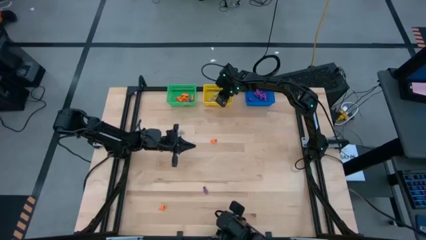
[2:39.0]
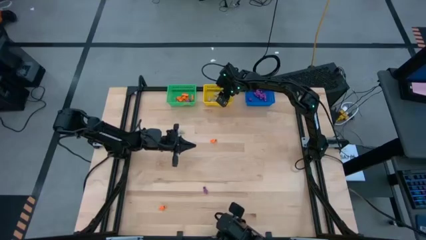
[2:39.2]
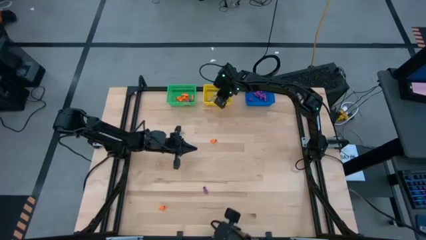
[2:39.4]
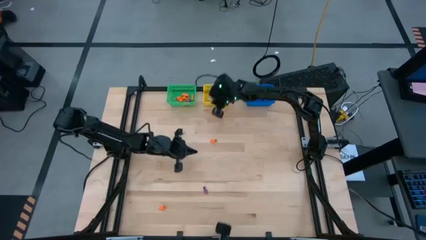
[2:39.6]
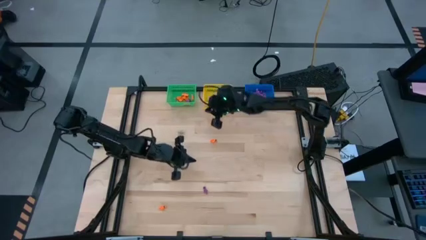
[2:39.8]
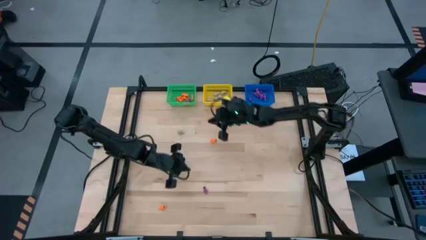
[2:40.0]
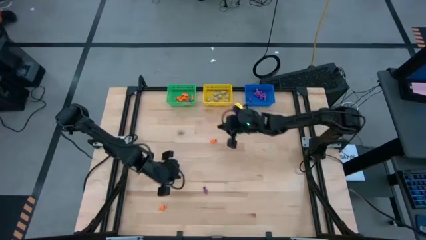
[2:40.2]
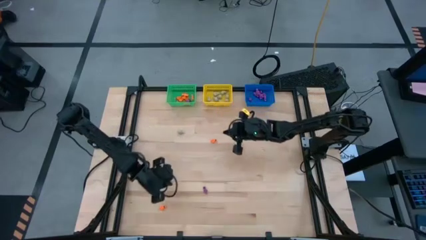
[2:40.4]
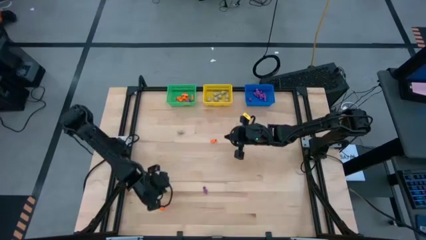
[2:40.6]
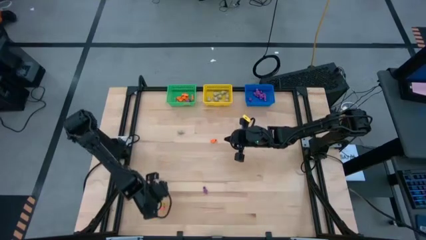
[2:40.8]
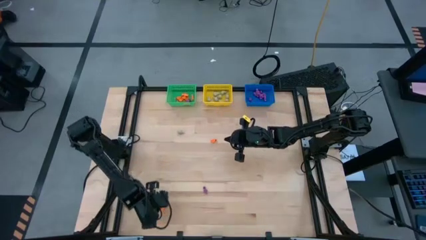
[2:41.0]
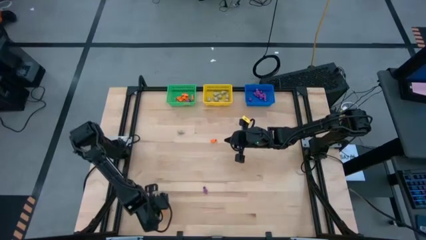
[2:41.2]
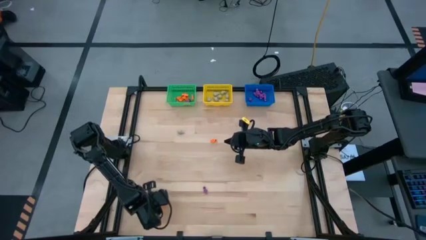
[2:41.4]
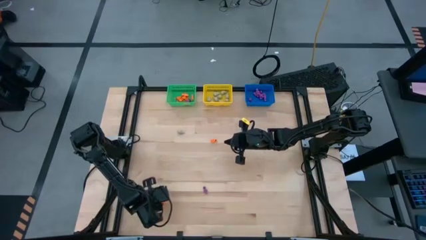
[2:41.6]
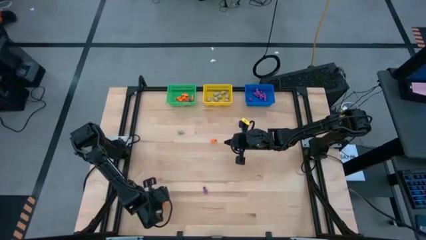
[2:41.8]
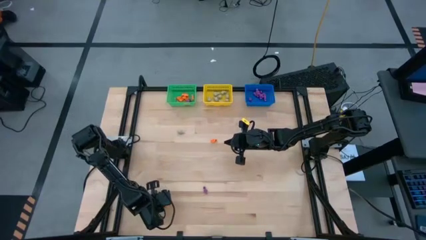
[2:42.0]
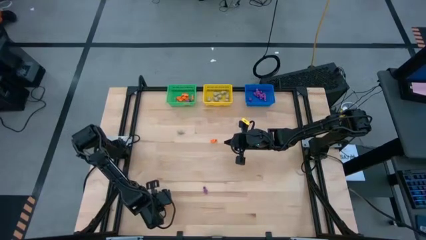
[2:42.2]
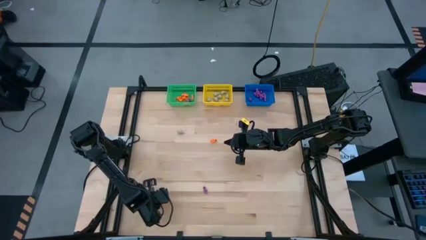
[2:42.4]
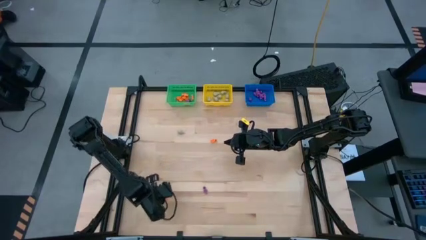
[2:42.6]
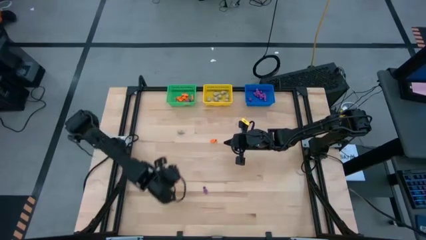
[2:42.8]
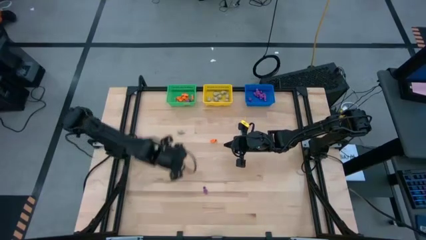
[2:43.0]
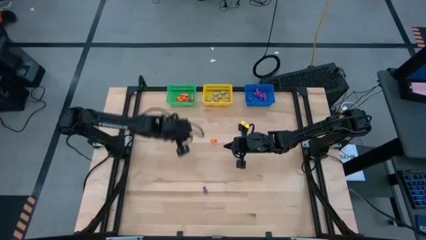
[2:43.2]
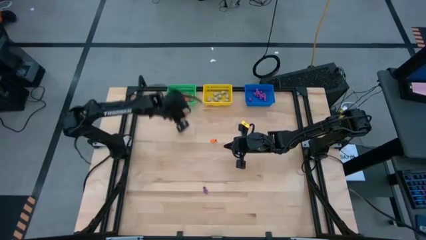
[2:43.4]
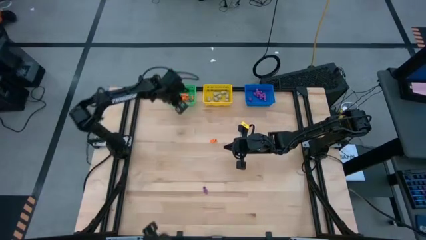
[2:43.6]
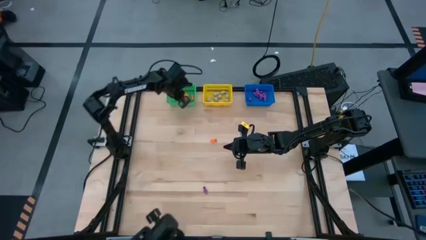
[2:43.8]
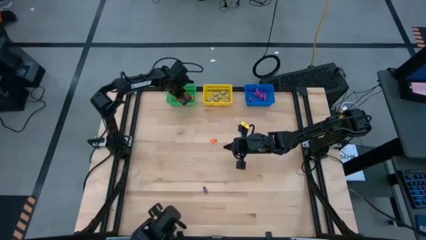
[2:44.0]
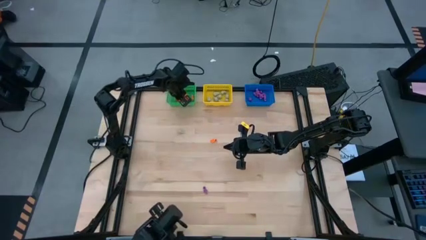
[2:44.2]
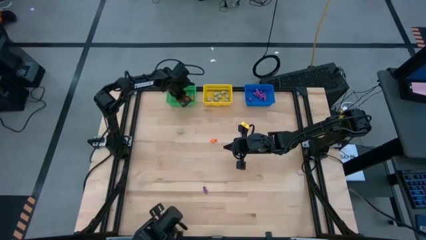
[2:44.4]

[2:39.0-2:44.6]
Task: Sort Halloween decoration
Put the orange skeleton toy into the green bin

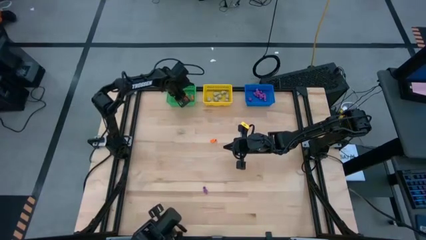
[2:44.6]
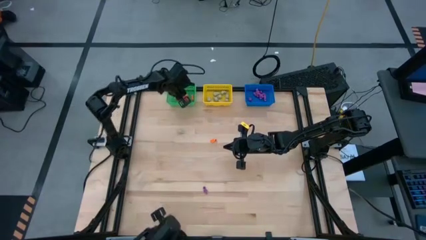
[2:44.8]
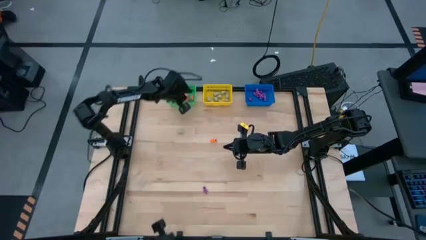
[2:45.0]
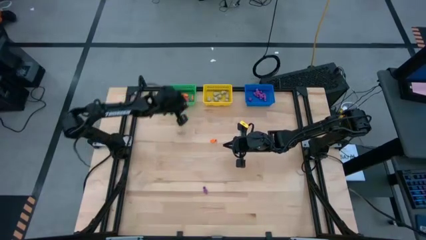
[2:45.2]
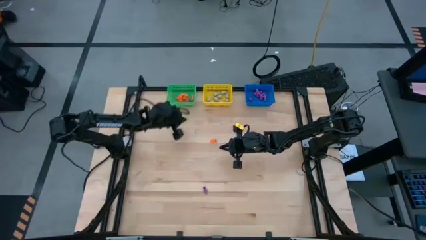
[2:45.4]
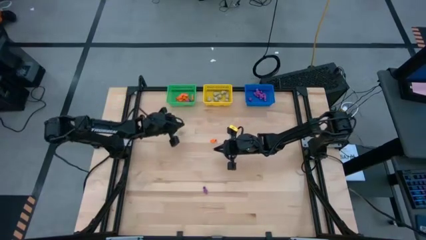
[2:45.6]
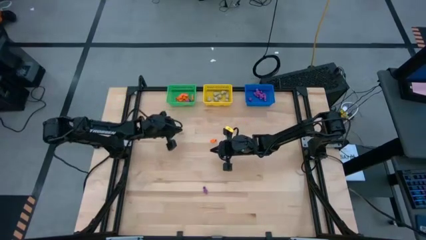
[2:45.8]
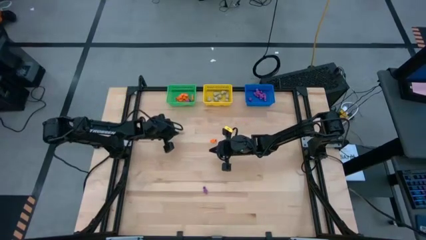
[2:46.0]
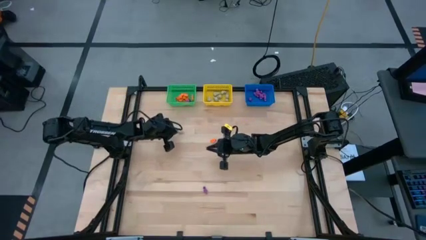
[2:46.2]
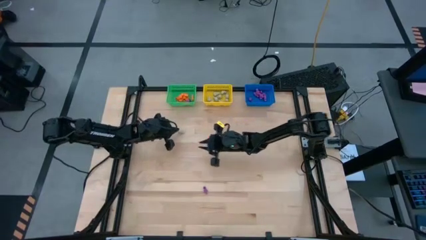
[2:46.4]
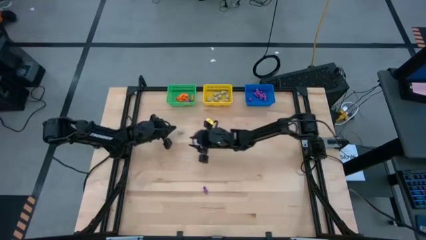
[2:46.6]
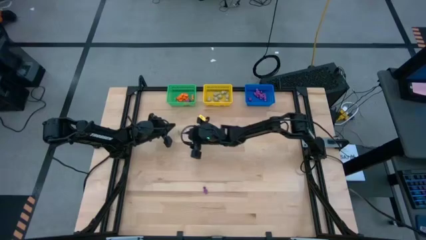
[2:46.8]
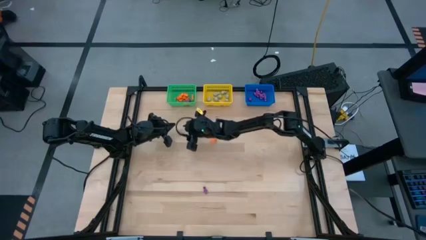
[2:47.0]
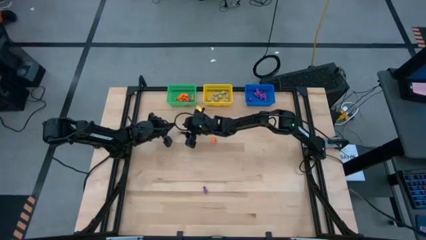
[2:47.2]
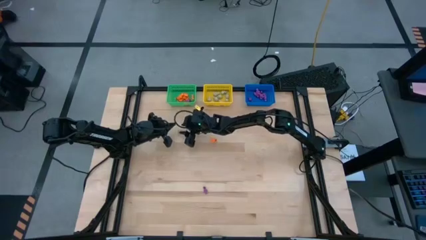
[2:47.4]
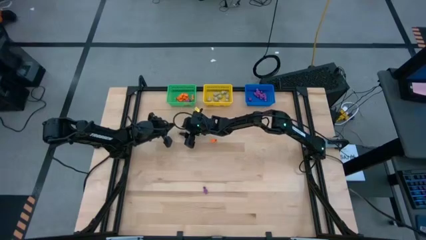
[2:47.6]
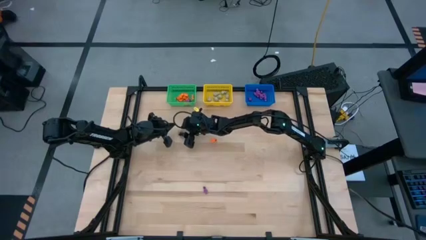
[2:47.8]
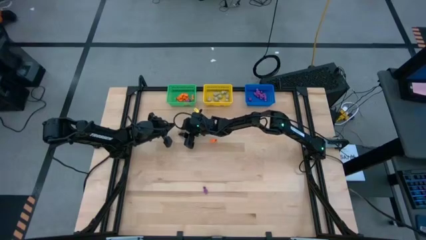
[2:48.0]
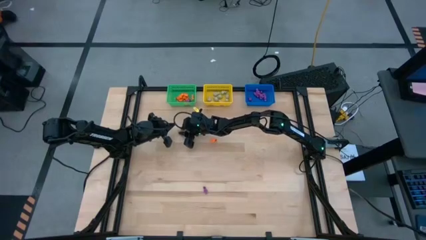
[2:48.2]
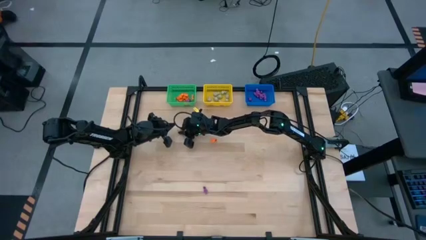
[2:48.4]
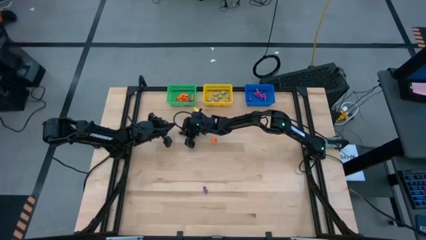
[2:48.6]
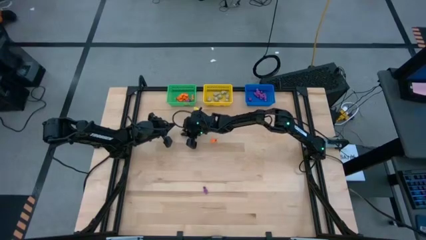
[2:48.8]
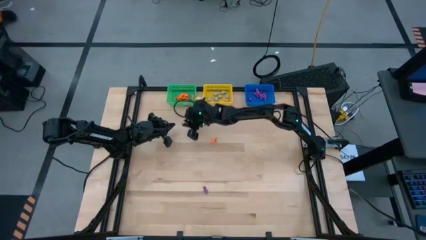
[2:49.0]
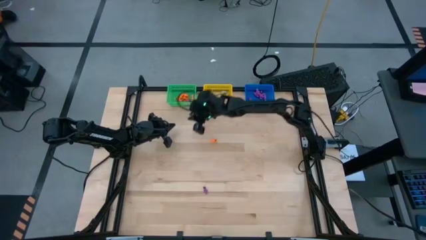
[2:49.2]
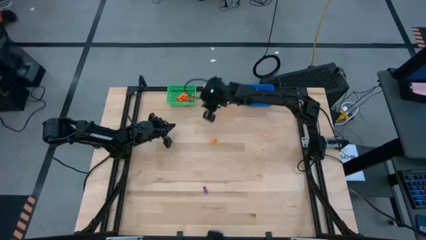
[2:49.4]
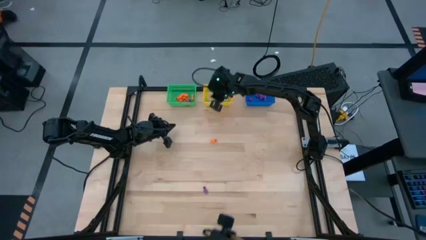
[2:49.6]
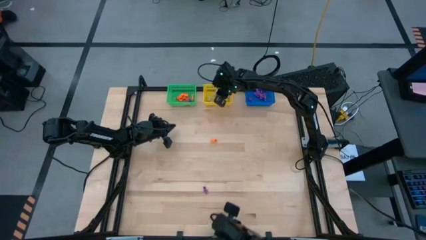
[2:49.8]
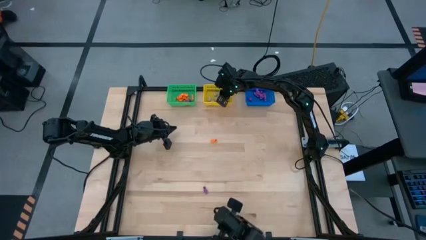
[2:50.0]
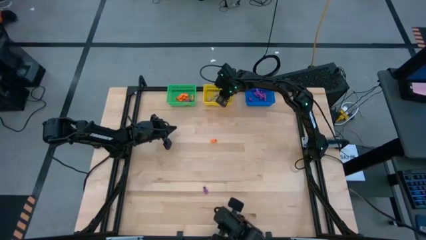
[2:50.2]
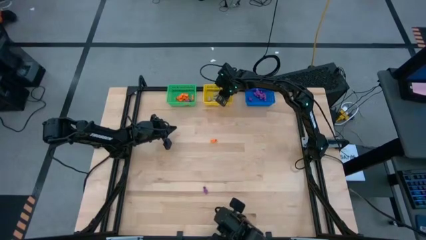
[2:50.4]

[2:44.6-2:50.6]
Put the white skull toy into the yellow bin

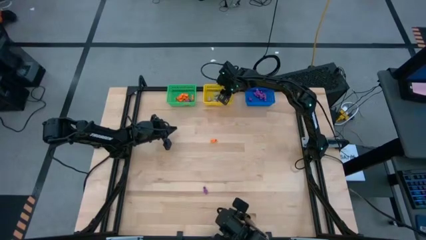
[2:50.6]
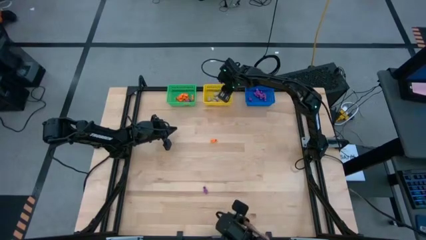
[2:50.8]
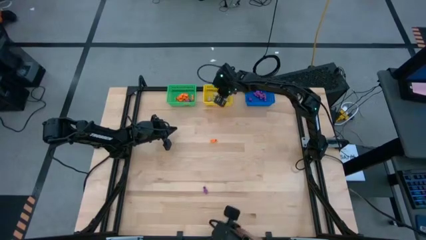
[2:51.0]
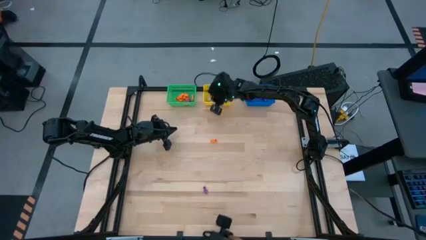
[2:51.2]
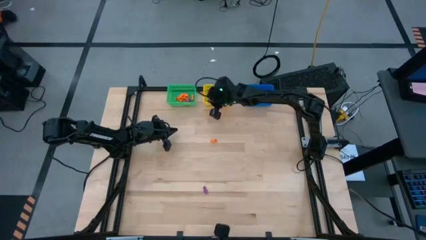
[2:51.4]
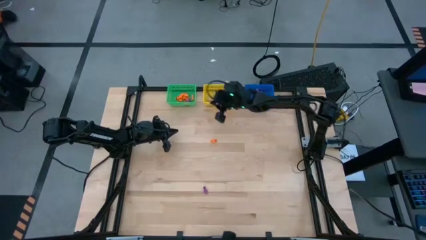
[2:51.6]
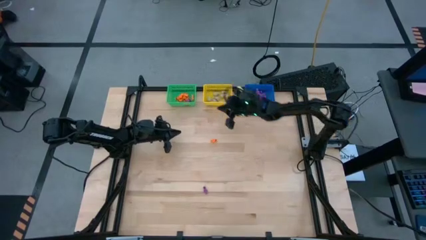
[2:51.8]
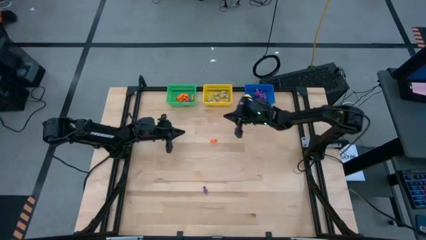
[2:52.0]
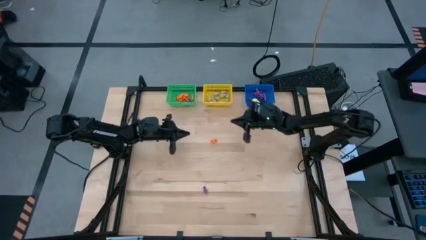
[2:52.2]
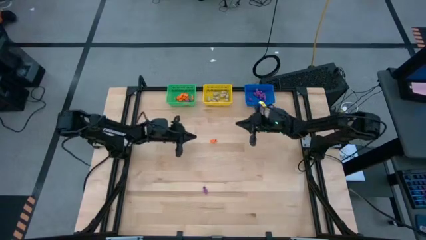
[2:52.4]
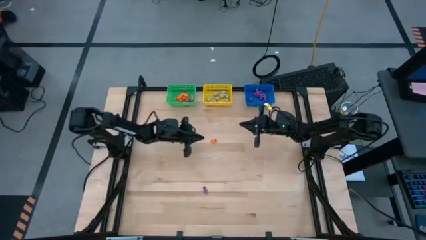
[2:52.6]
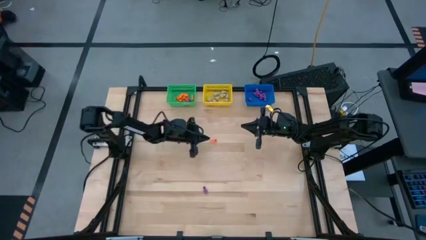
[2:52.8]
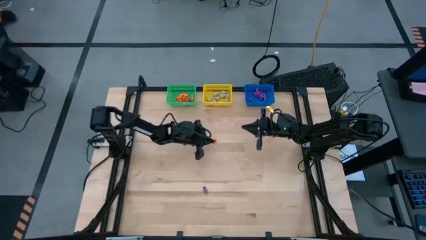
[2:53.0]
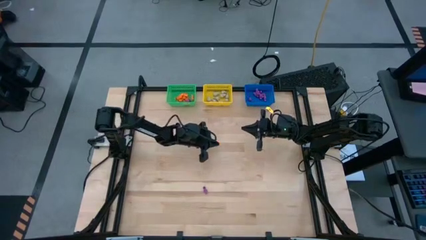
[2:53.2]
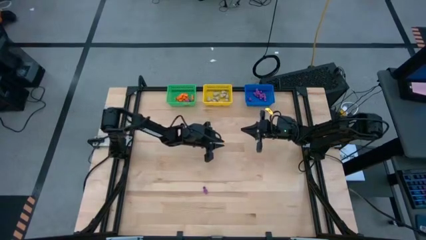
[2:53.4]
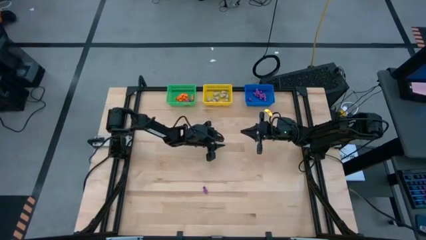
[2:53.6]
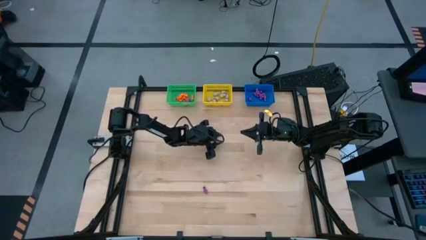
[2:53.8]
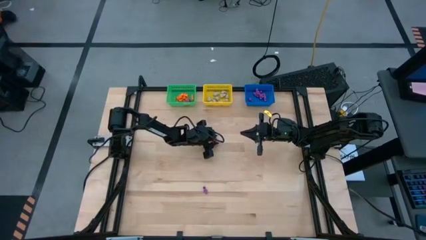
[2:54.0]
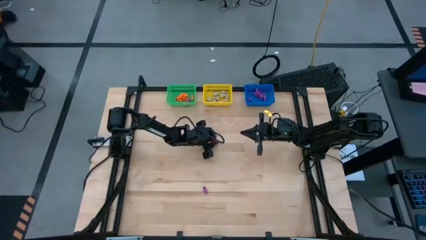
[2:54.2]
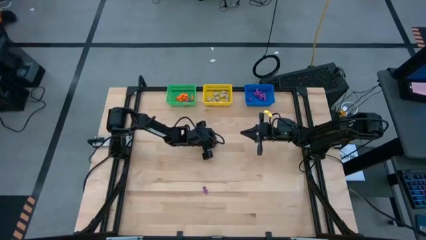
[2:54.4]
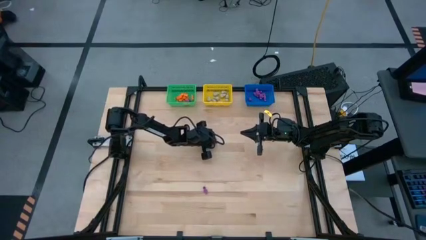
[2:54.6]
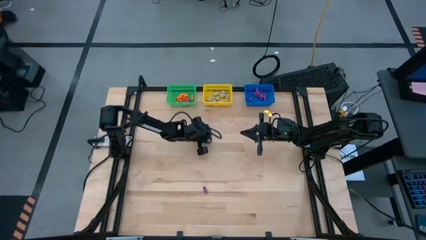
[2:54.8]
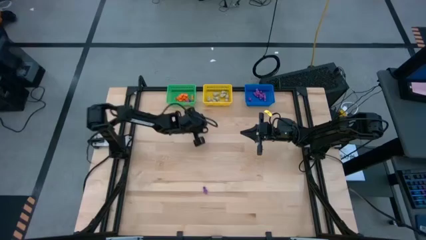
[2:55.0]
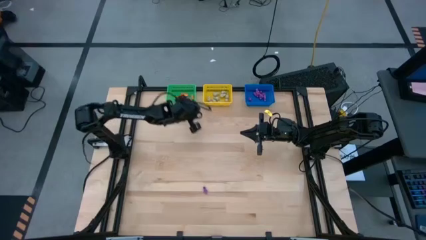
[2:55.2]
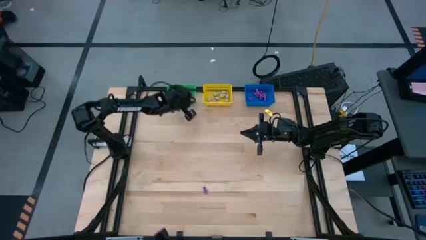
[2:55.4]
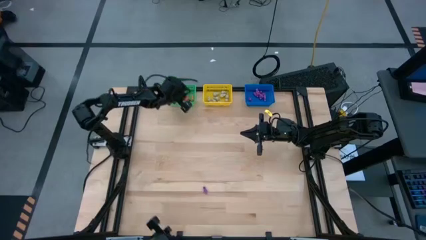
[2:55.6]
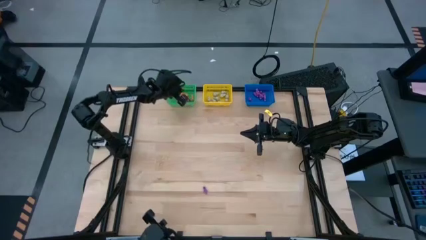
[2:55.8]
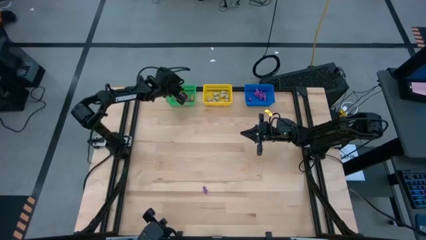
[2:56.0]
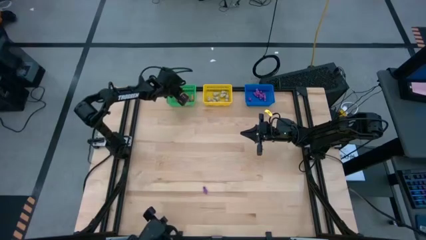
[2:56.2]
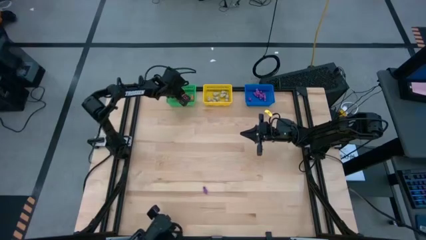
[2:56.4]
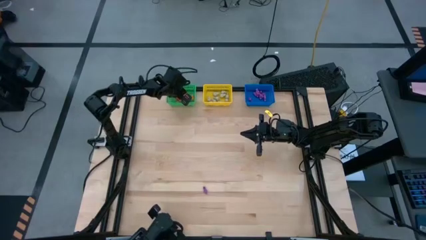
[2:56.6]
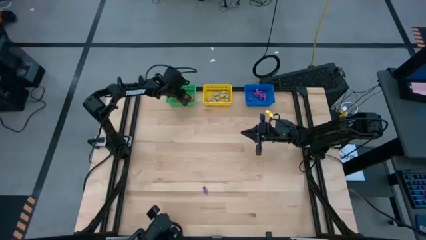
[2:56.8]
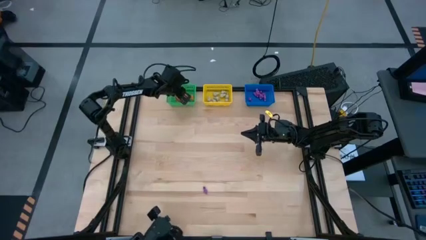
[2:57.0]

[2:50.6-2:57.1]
Put the orange skeleton toy into the green bin
